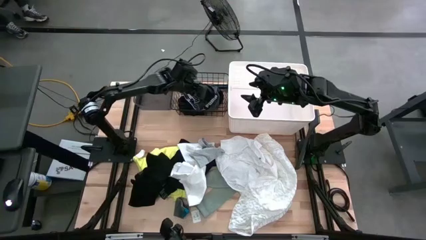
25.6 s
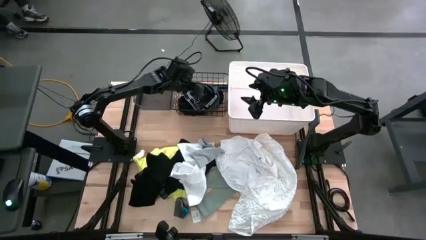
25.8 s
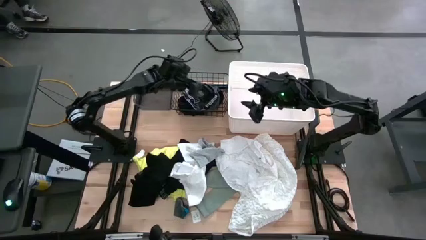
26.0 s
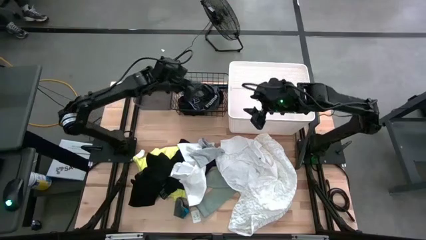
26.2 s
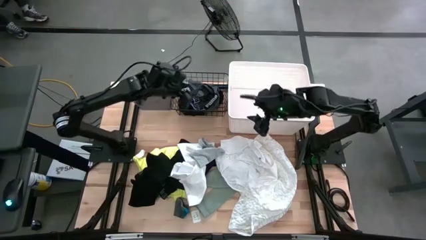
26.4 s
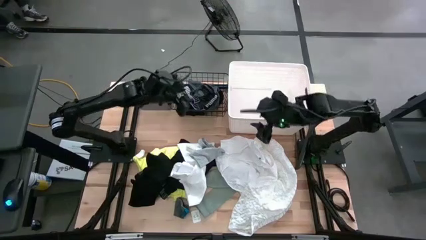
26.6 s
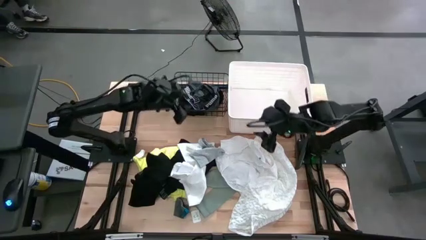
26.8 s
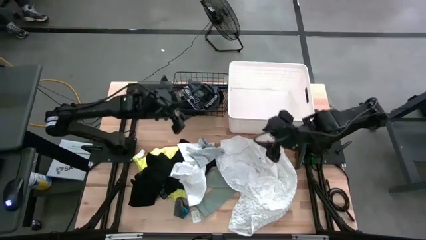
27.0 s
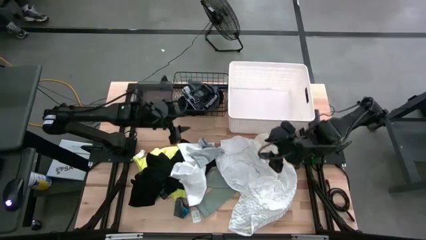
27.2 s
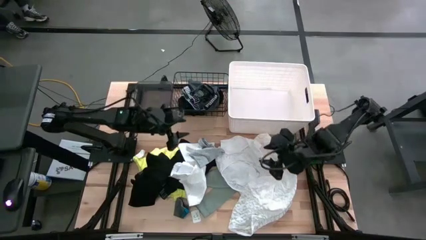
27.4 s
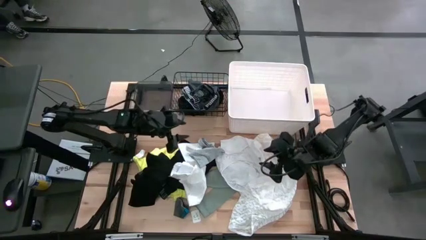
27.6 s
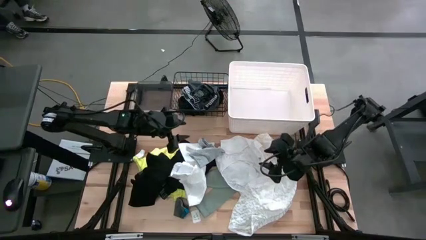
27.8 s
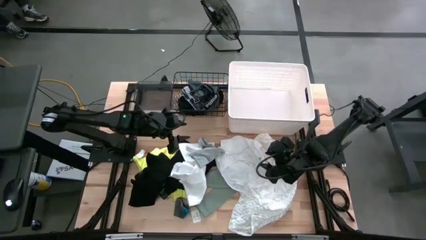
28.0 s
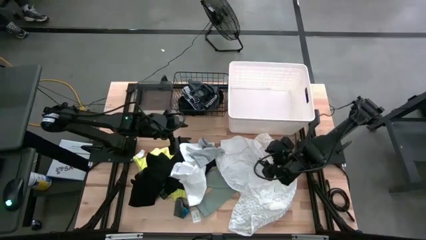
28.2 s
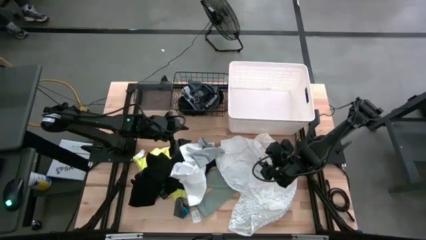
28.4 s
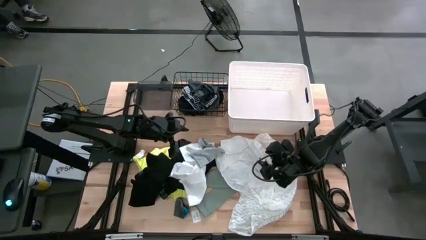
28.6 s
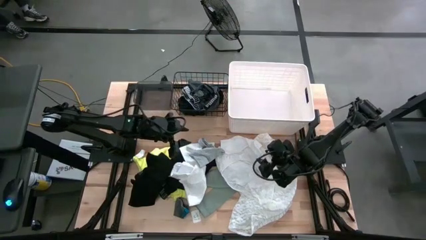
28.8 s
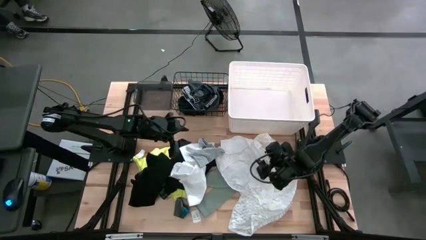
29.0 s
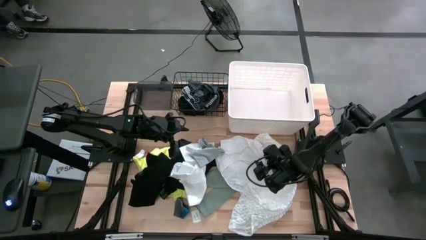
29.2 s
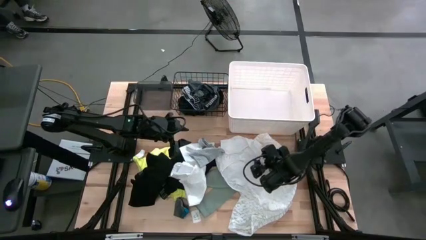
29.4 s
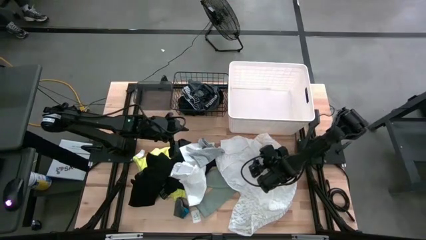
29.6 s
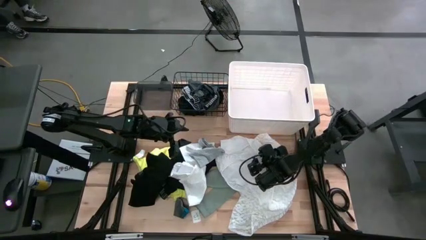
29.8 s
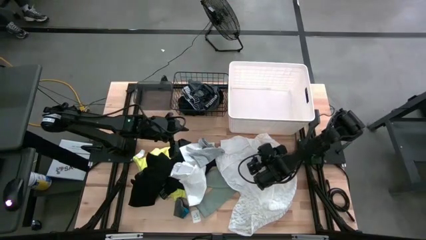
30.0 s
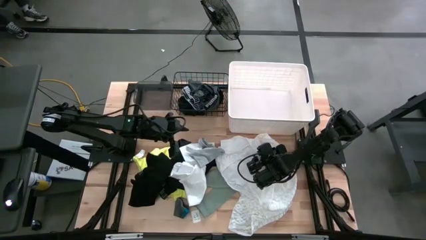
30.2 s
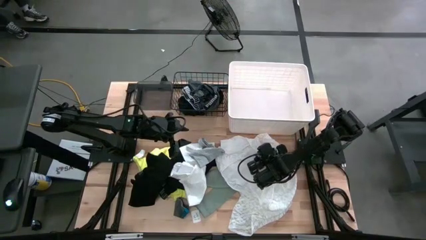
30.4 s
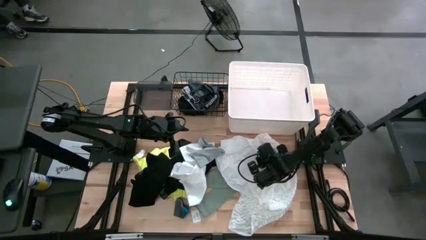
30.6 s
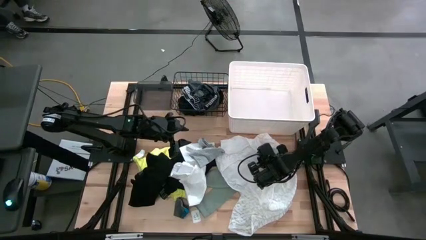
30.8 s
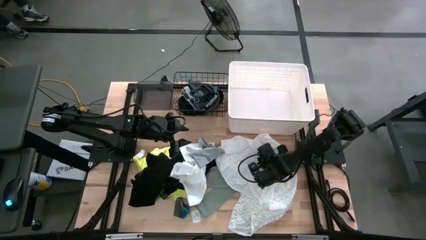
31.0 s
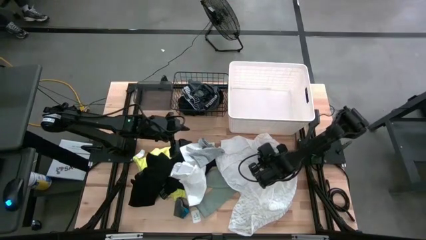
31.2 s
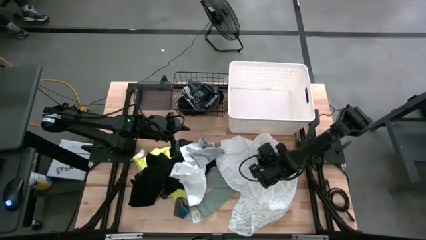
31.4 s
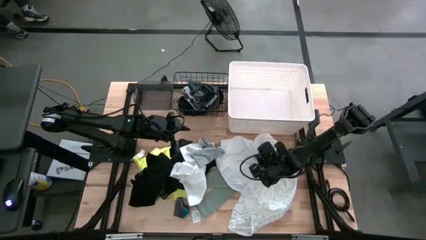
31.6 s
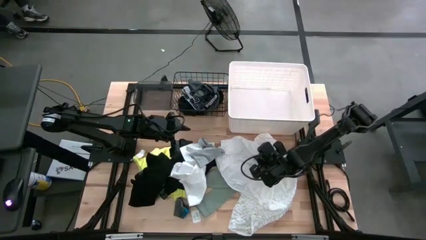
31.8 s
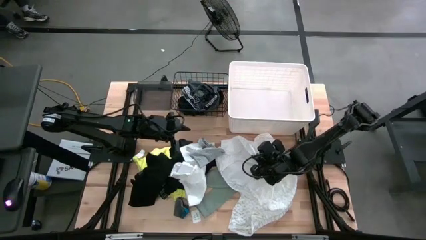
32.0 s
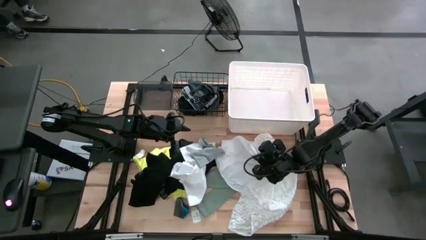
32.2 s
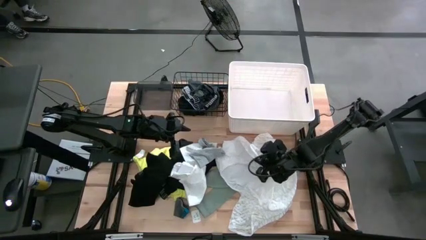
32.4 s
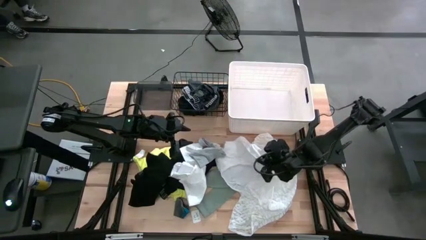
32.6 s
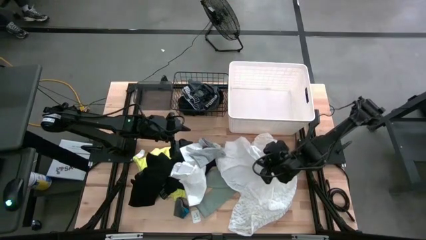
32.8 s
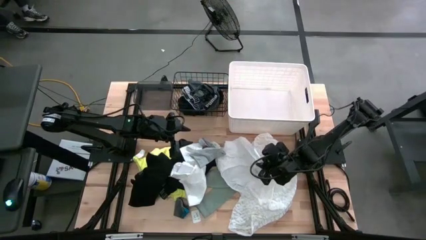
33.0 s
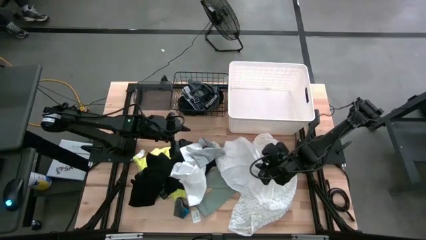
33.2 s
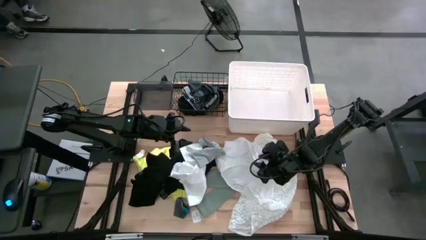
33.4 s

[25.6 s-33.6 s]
Task: Pick & Place Cloths
Put the white sock into the black bin

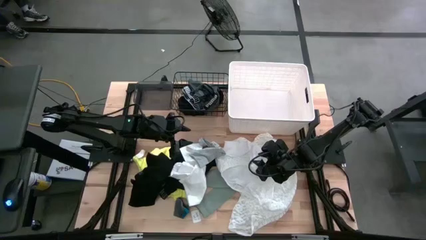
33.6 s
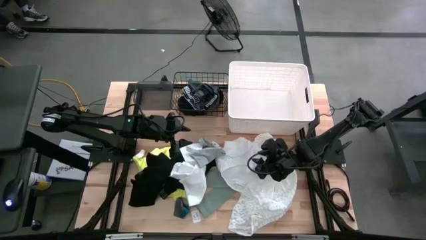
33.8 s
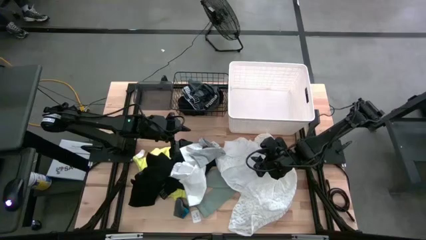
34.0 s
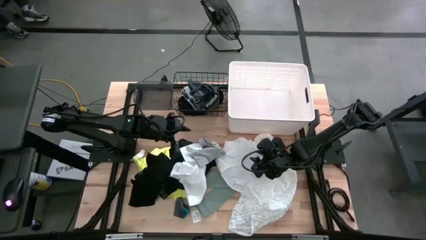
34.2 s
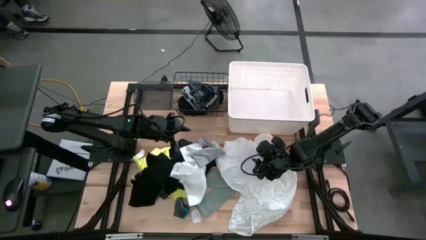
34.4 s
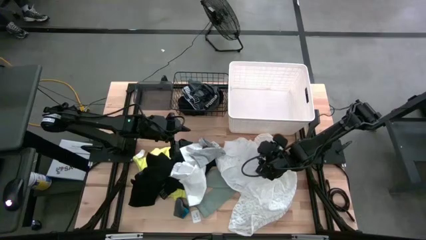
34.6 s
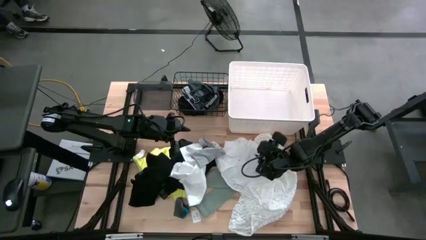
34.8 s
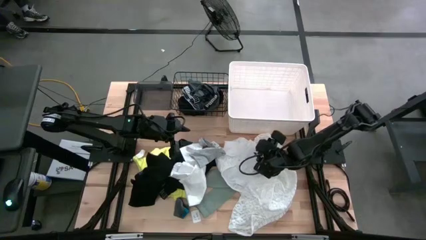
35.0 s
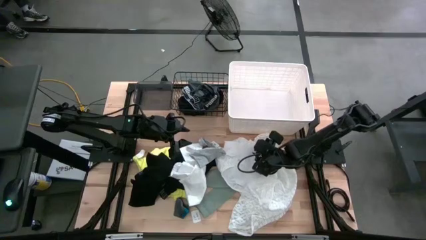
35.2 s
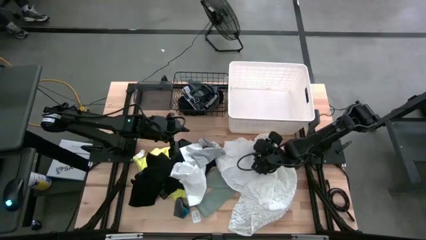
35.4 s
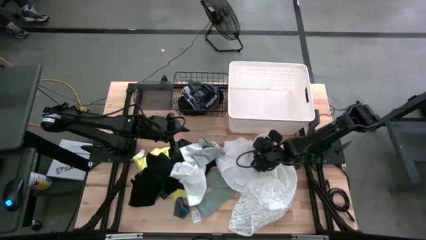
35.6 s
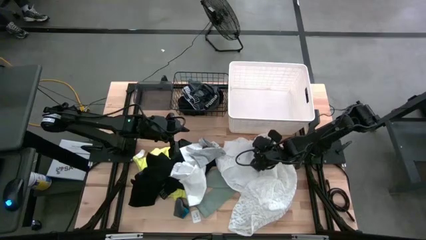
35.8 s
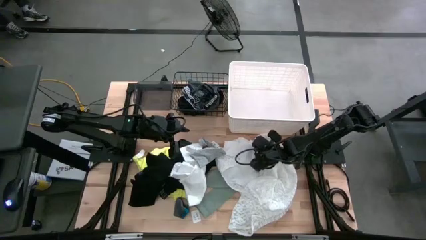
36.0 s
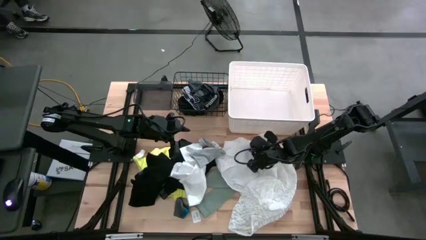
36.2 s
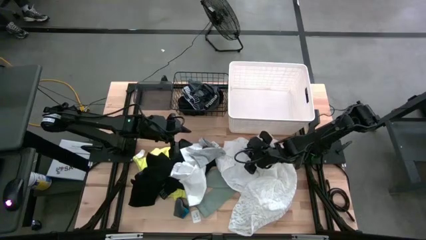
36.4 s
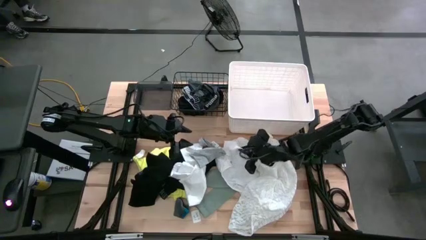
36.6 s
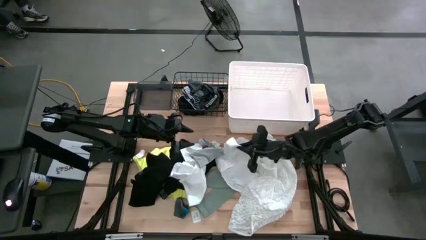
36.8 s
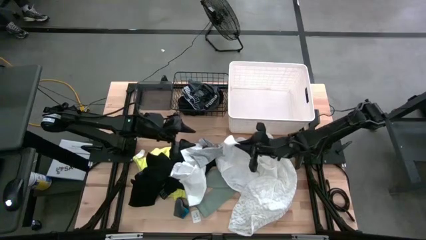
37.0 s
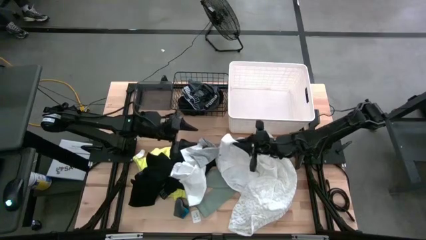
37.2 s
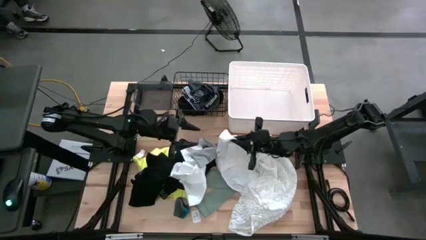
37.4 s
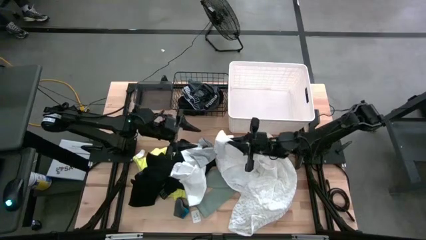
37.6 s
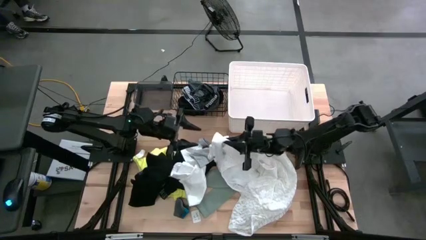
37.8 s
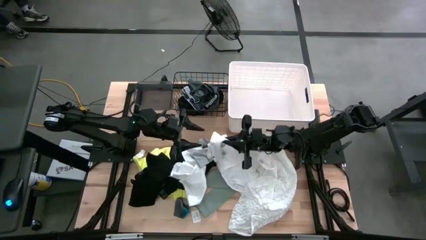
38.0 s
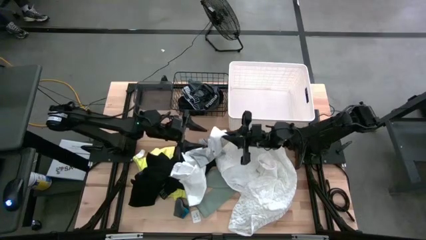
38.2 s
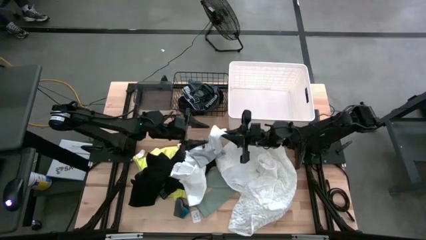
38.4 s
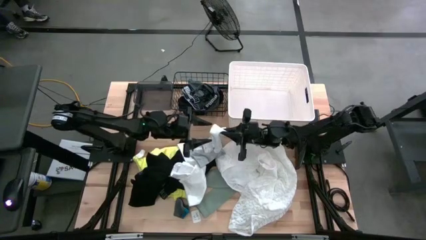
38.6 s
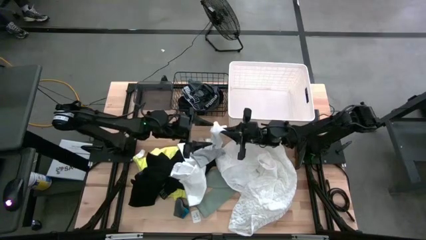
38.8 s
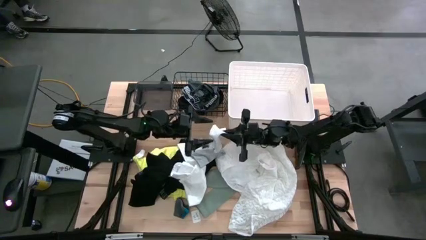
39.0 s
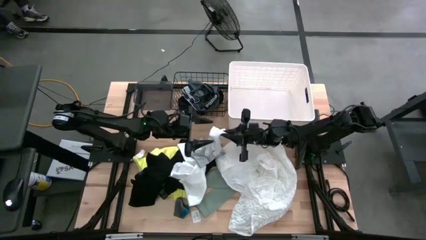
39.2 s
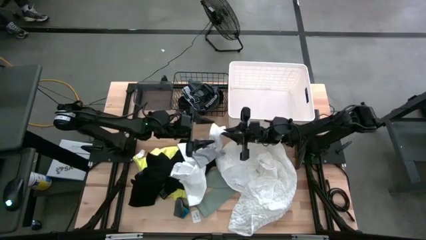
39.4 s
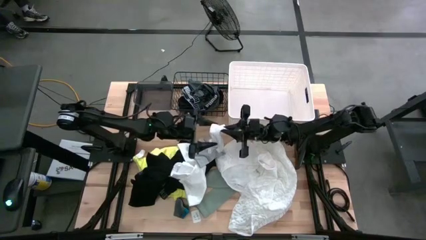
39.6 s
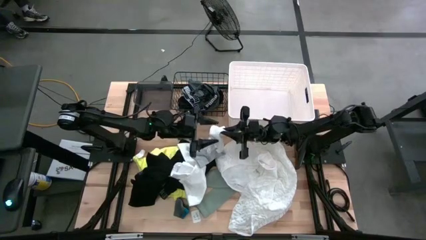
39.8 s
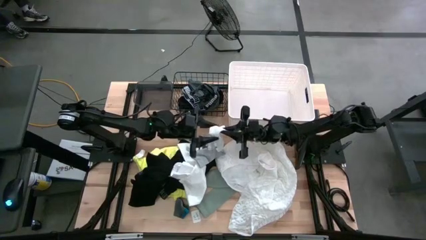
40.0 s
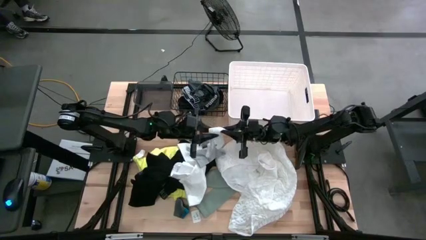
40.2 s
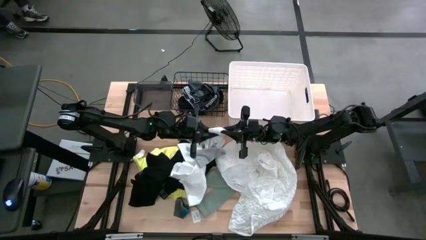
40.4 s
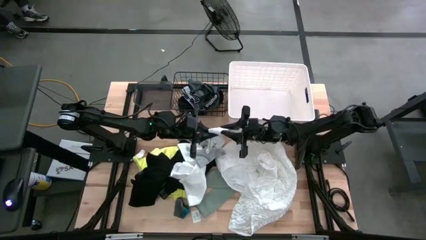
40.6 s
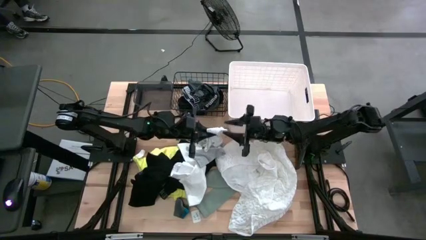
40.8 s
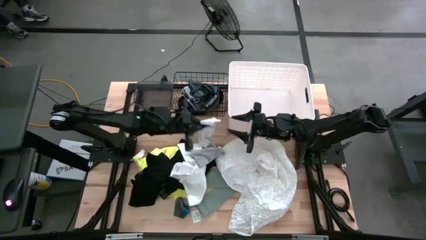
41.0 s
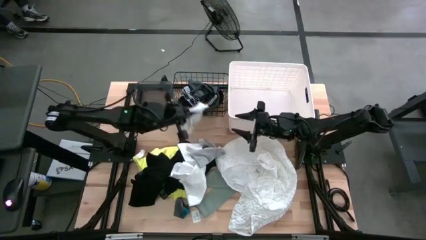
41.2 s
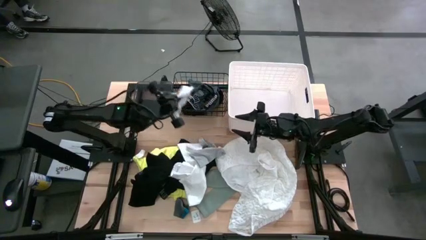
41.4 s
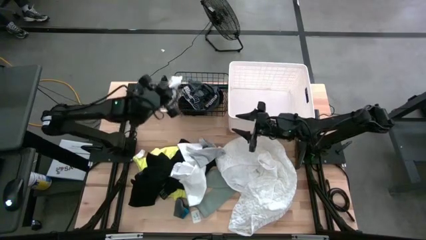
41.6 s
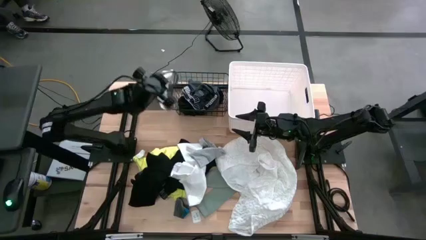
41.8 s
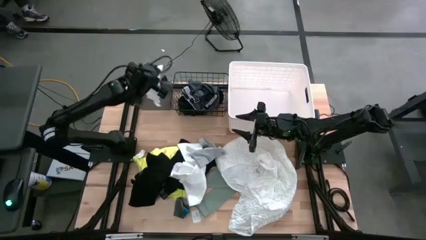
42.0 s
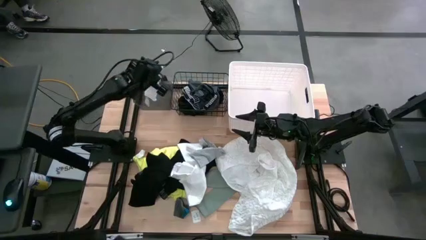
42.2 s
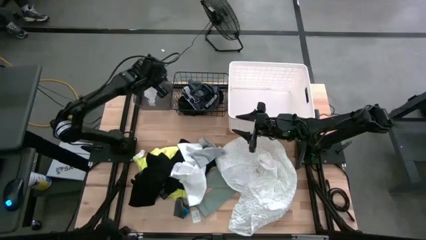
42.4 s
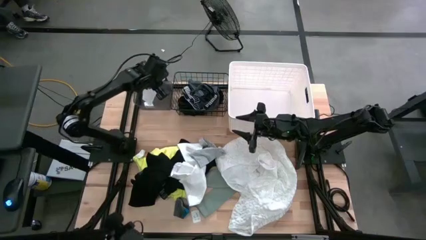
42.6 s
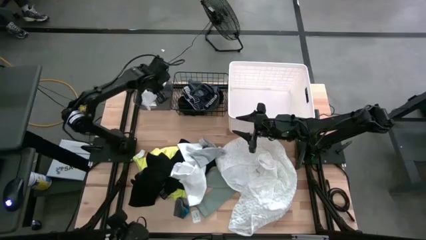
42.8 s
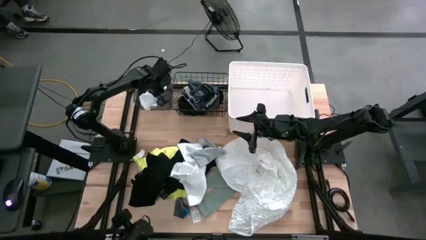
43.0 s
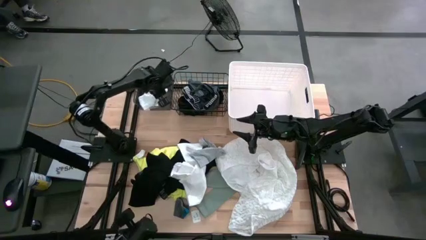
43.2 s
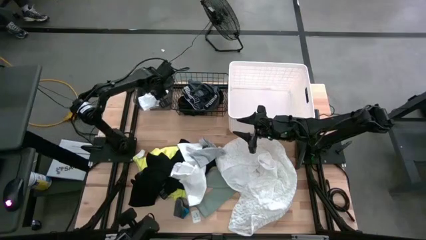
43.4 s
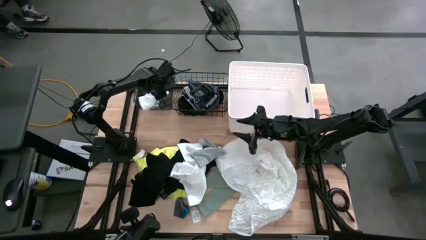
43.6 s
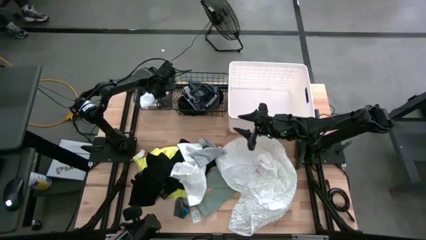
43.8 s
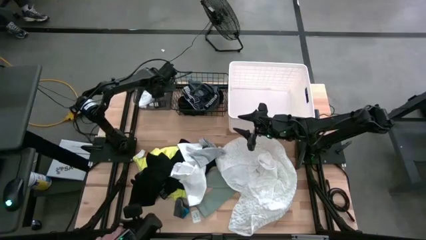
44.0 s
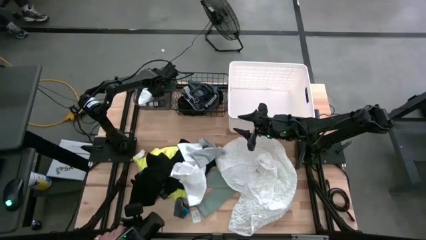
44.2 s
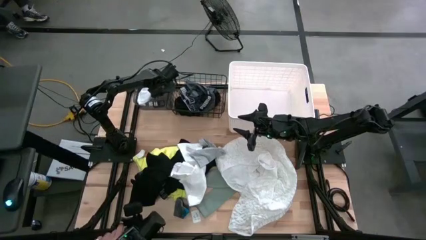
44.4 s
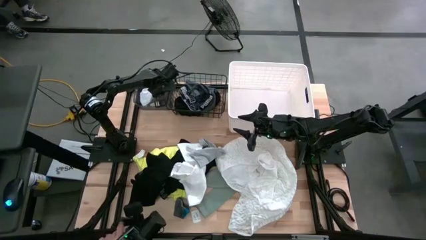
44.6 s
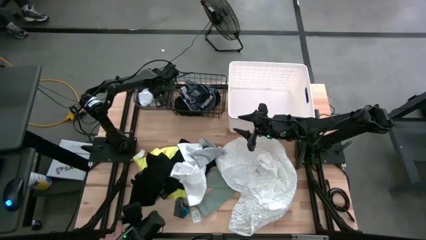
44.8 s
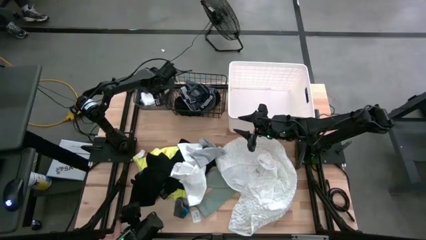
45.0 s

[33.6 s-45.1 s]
Put the white sock into the black bin
